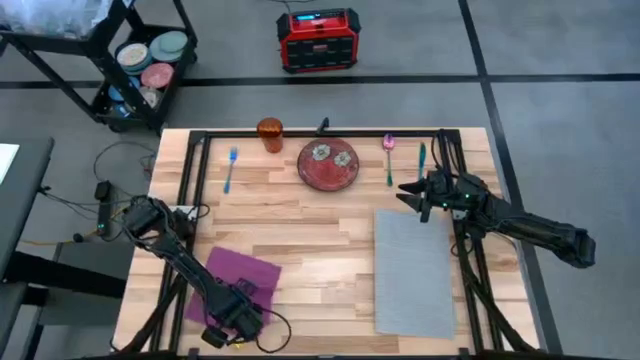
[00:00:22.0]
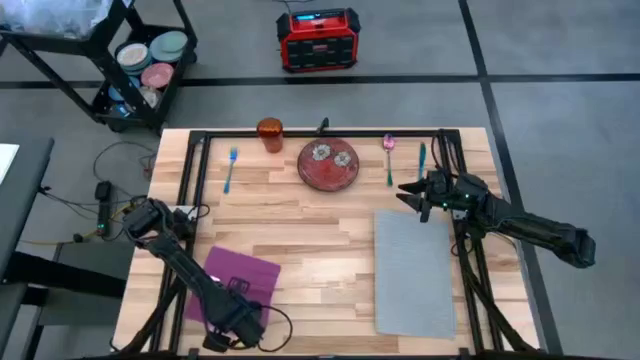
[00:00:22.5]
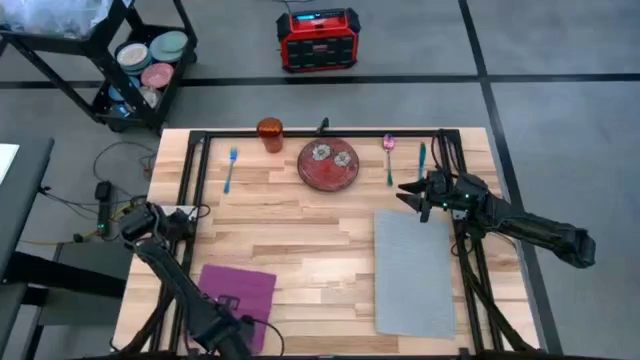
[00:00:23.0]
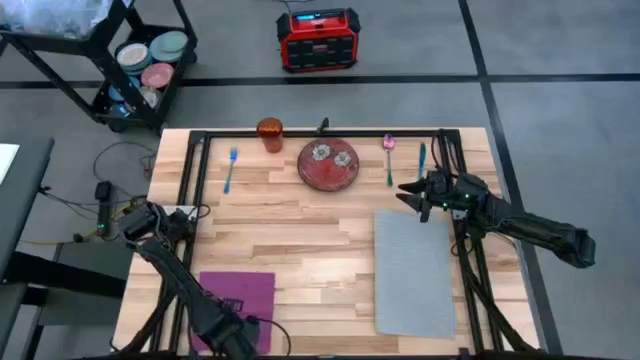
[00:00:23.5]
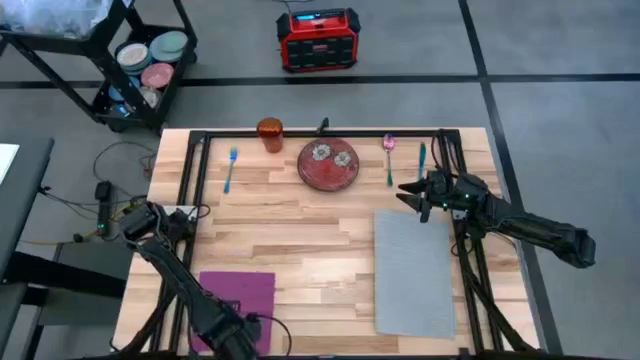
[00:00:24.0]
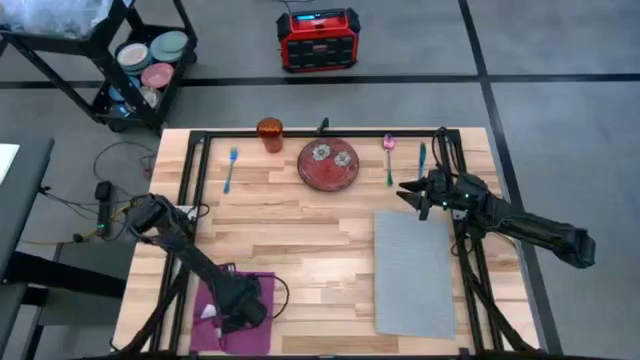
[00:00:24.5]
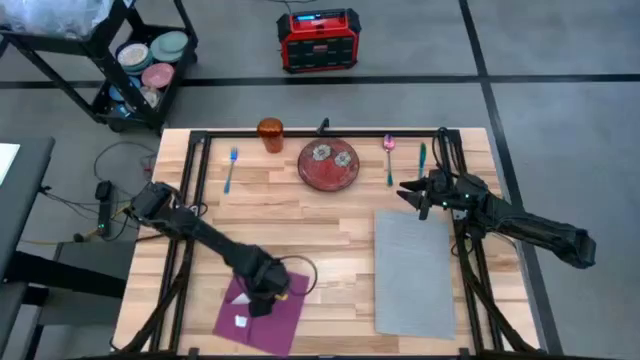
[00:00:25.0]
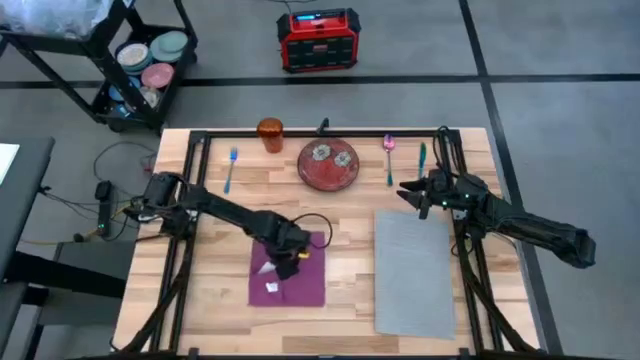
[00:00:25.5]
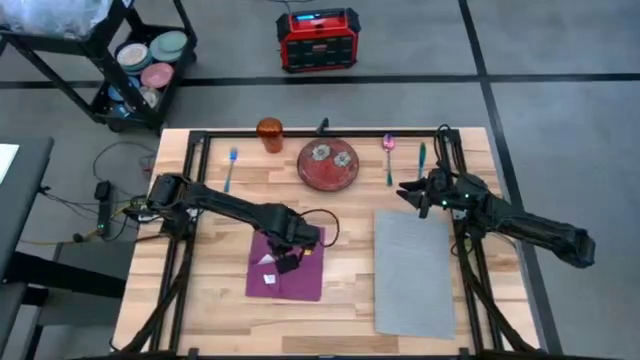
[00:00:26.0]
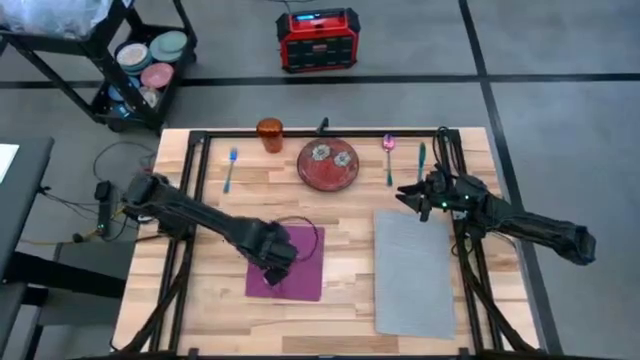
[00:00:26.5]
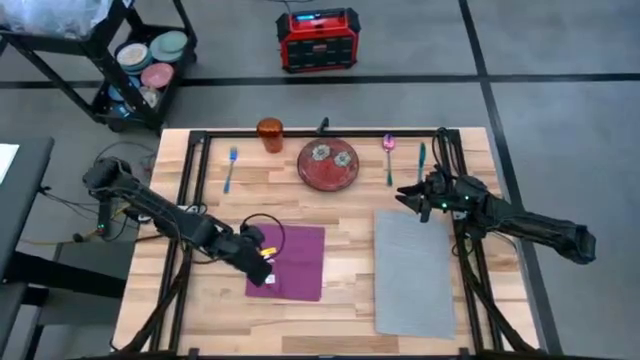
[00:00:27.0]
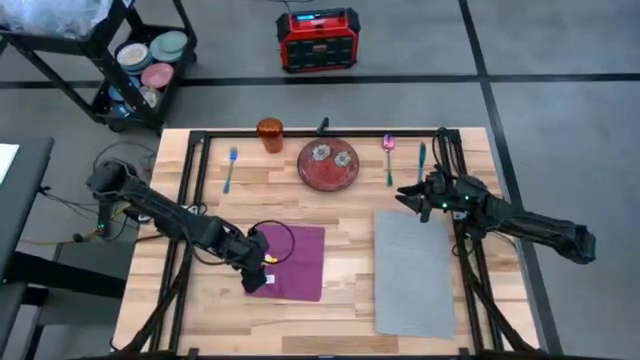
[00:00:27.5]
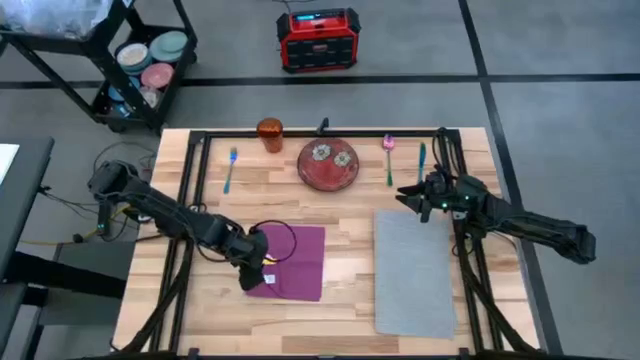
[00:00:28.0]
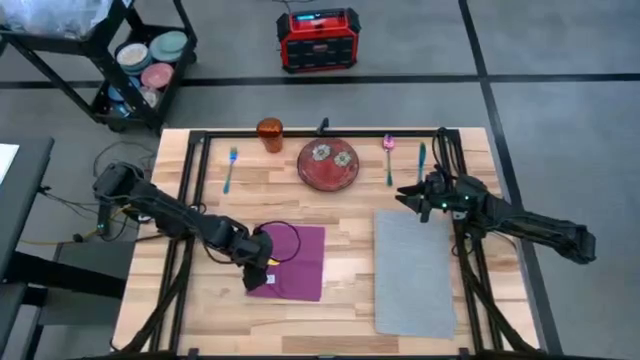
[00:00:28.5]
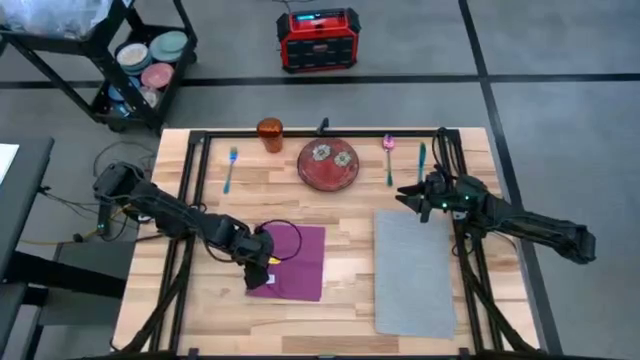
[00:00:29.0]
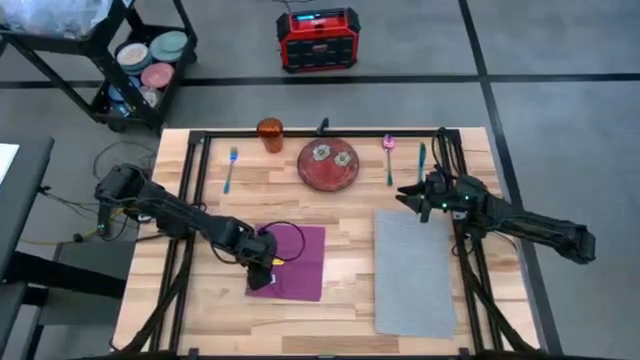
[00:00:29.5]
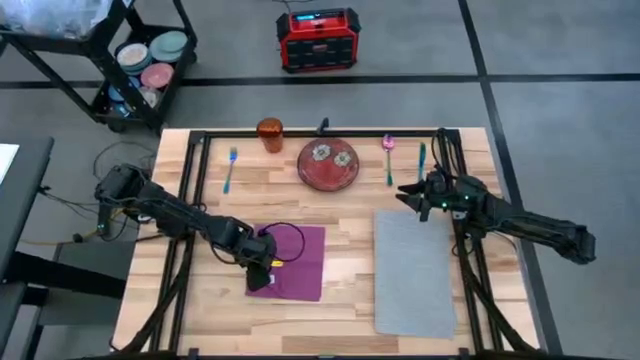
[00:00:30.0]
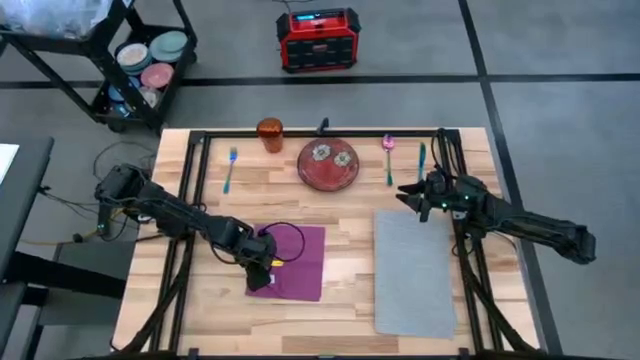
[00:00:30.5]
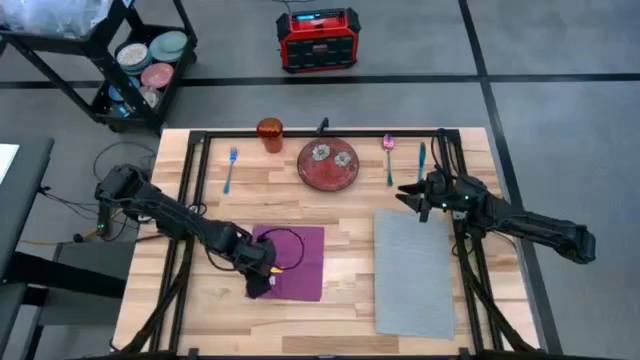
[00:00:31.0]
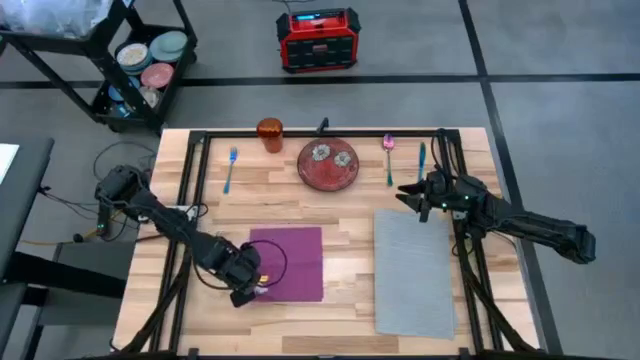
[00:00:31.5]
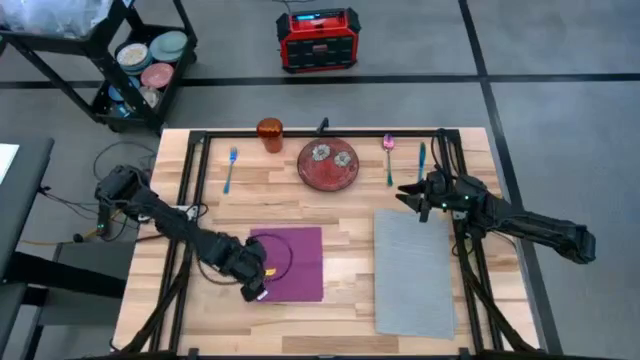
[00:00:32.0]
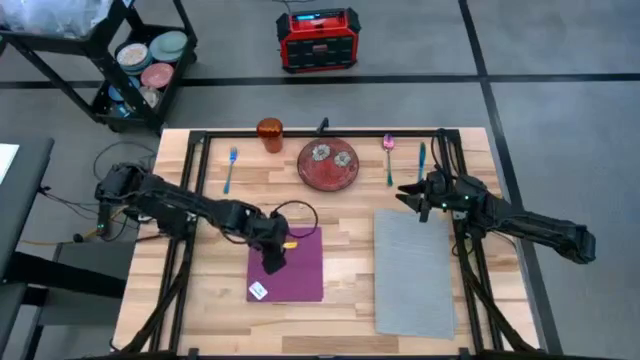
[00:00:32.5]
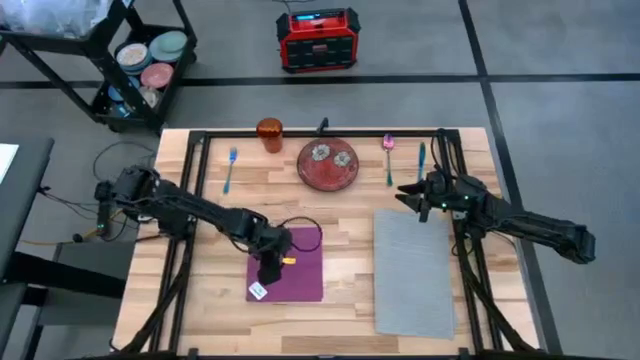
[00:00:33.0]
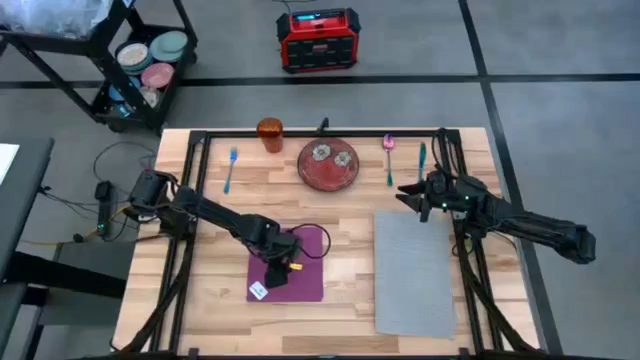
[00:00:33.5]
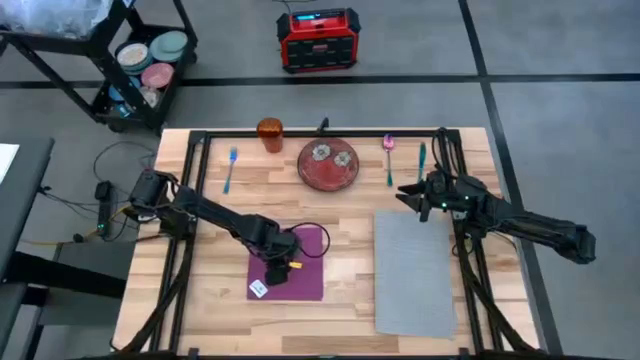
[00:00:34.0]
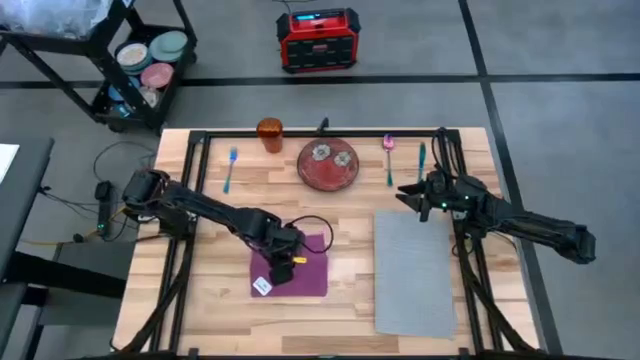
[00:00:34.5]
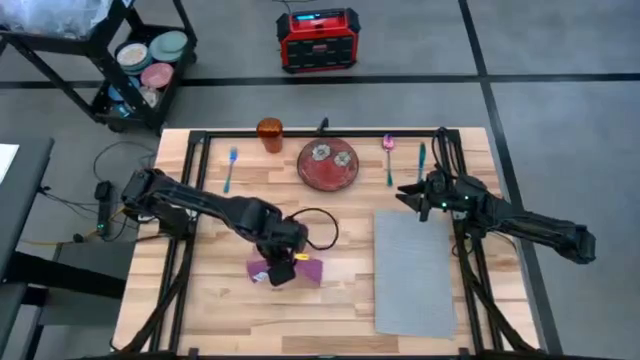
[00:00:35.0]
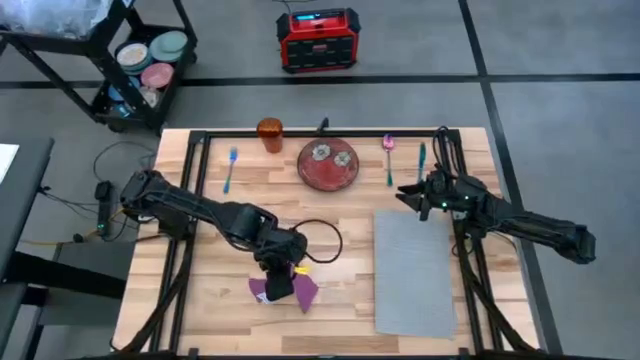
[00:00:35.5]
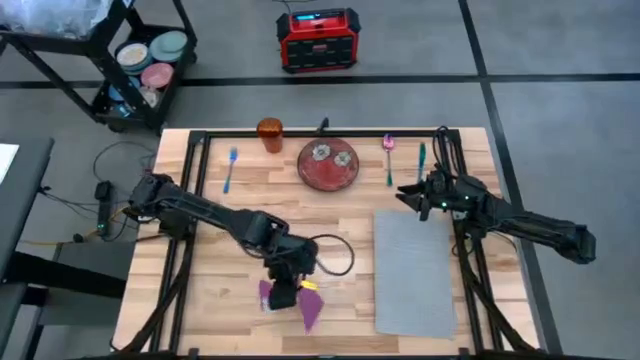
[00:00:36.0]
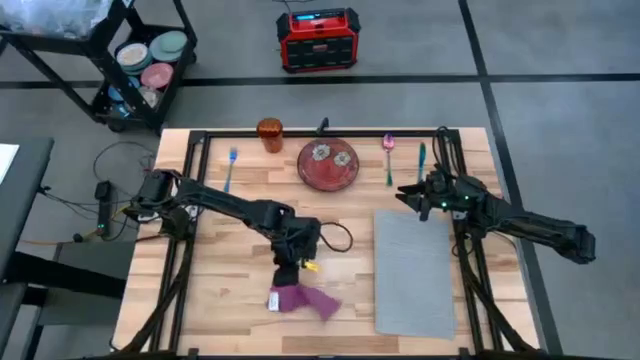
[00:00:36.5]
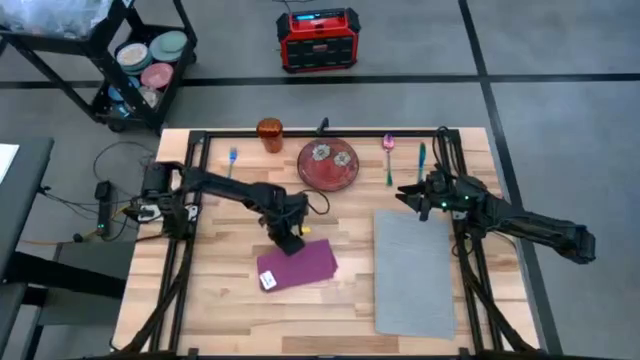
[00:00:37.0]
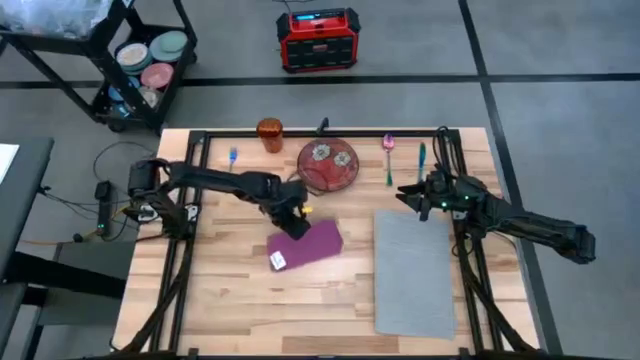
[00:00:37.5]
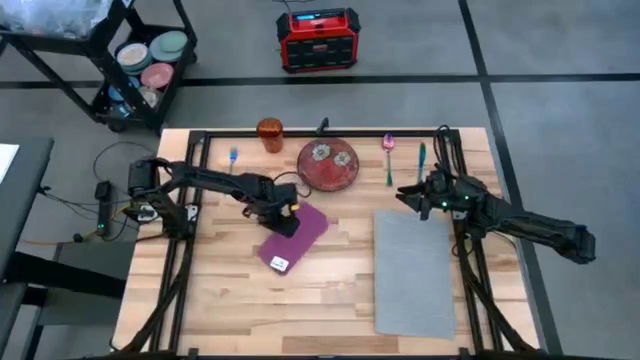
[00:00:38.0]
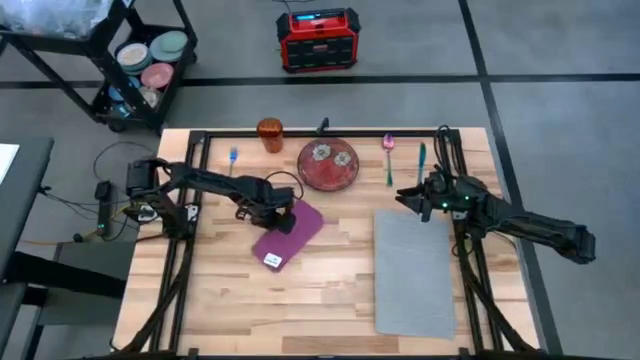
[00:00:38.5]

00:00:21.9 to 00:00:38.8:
Task: Set table place
Fold the purple table napkin

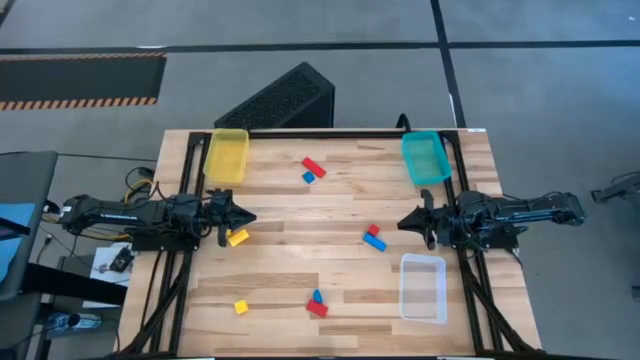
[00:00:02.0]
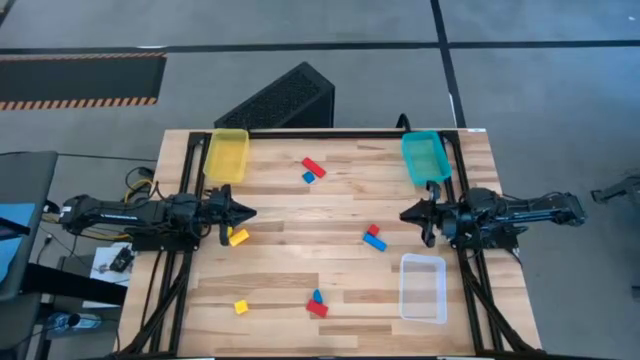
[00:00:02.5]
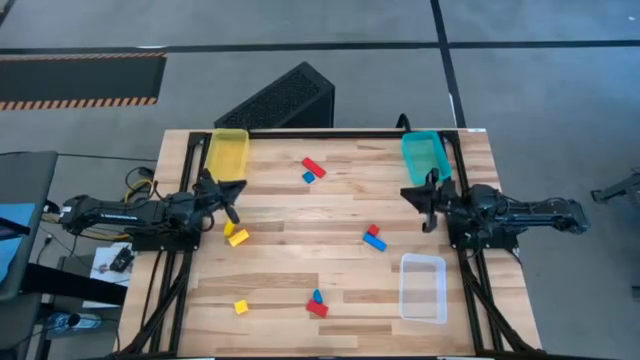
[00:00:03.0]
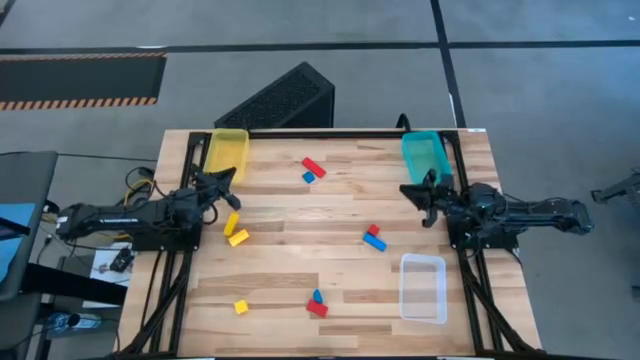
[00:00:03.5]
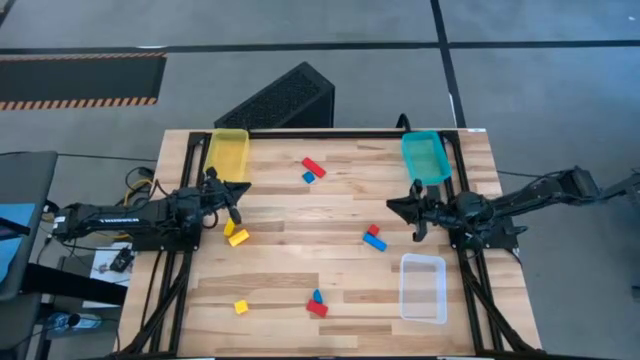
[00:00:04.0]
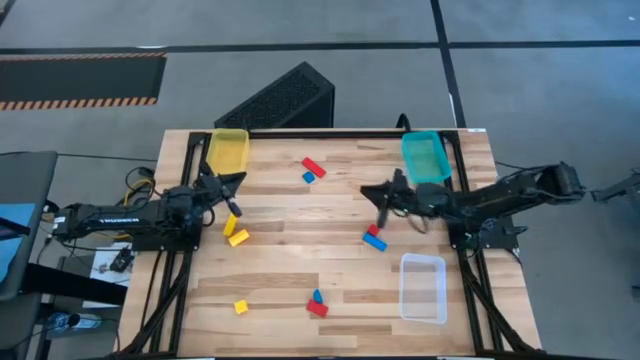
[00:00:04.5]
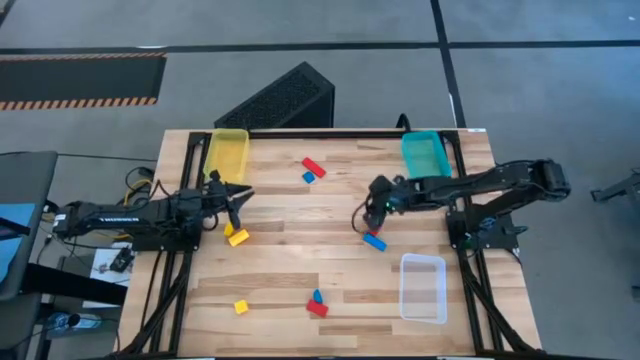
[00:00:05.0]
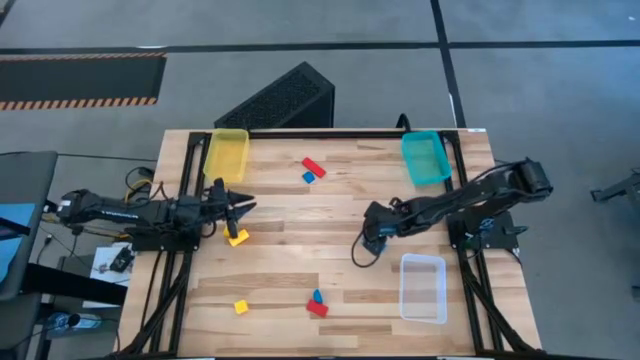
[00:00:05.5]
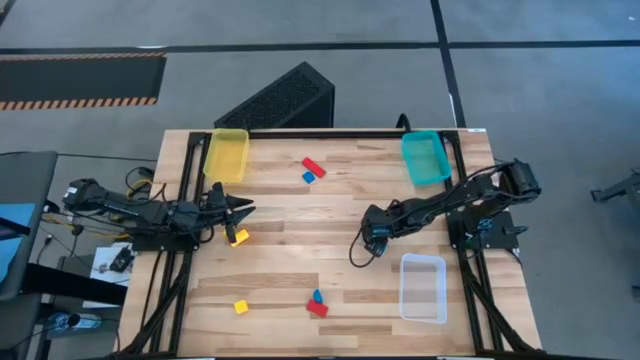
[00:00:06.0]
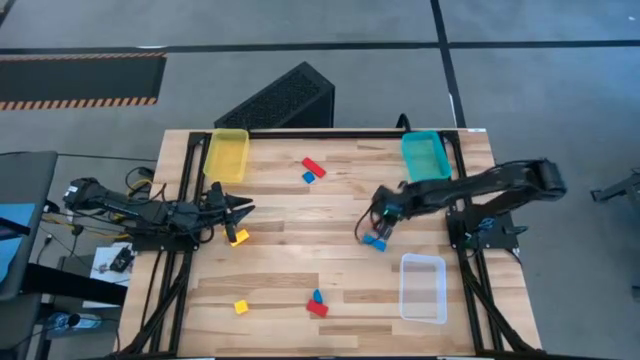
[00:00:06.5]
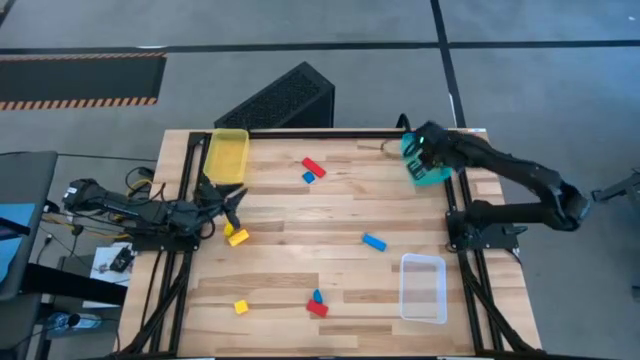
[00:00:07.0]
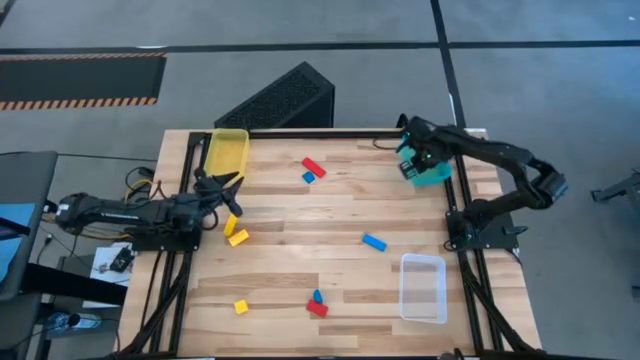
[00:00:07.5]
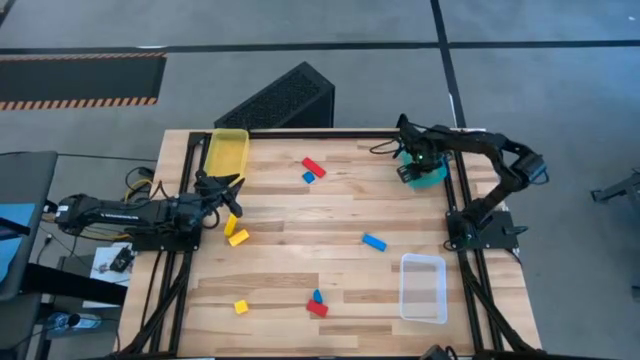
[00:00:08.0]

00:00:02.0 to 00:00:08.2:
Task: Sort & place blocks by color
Put the middle right red block into the light blue bin
